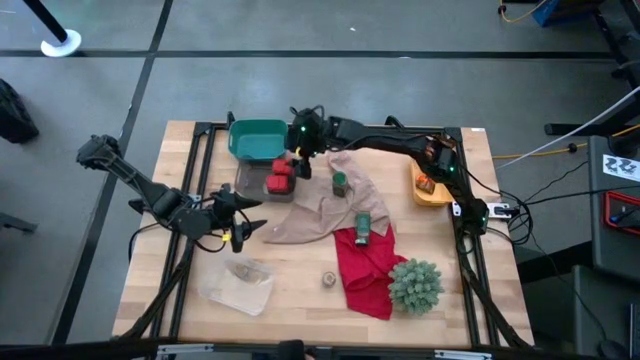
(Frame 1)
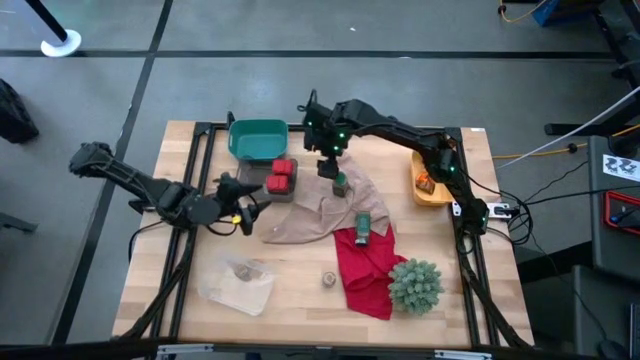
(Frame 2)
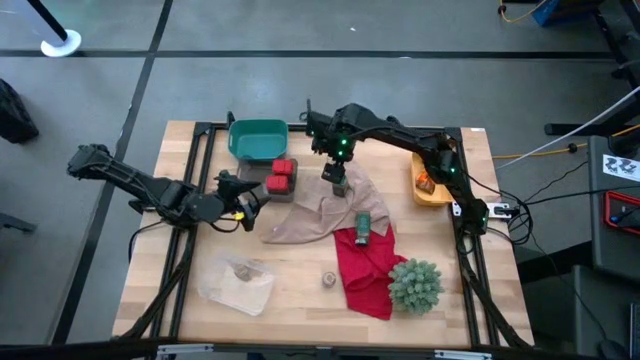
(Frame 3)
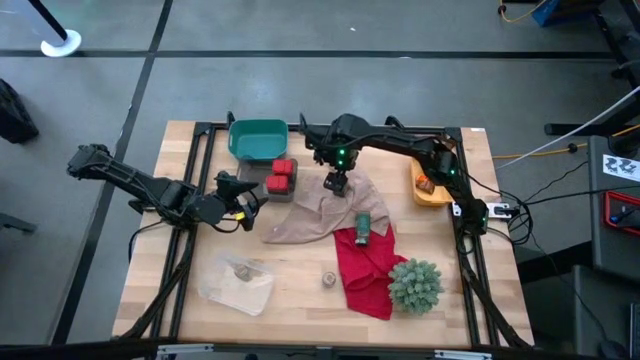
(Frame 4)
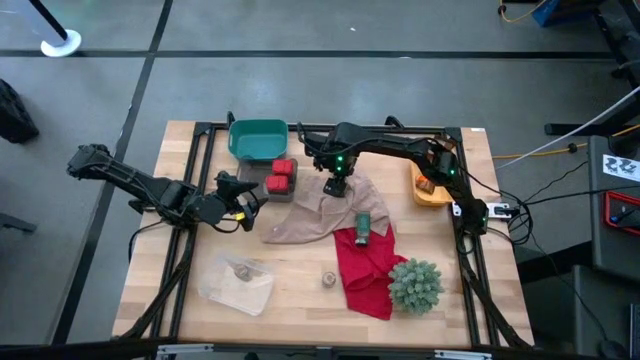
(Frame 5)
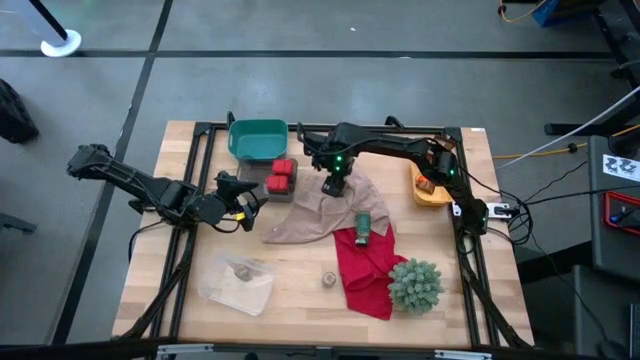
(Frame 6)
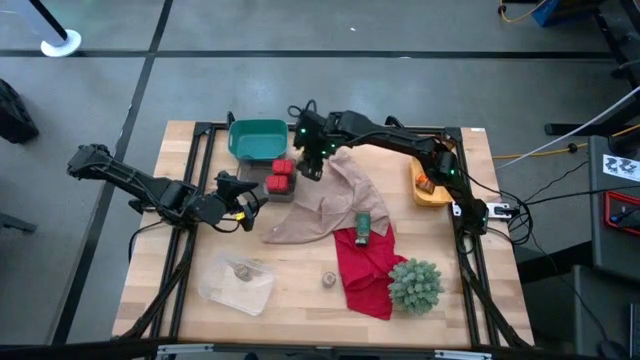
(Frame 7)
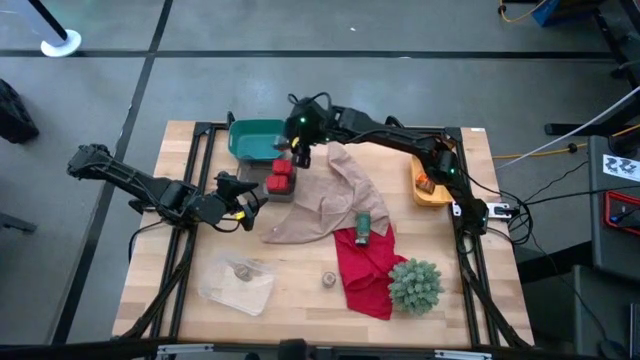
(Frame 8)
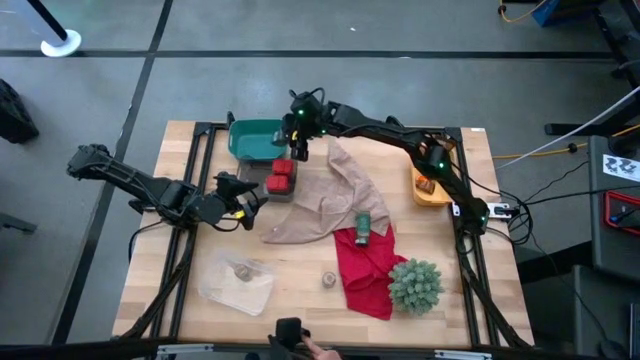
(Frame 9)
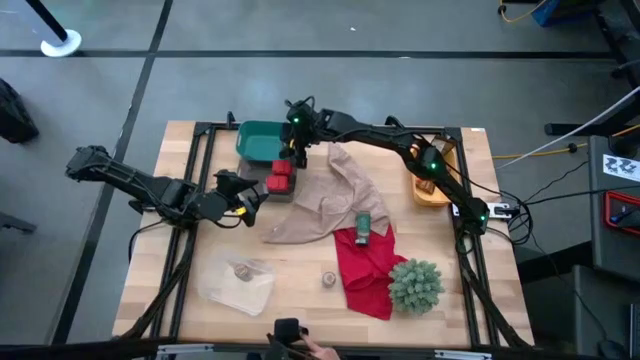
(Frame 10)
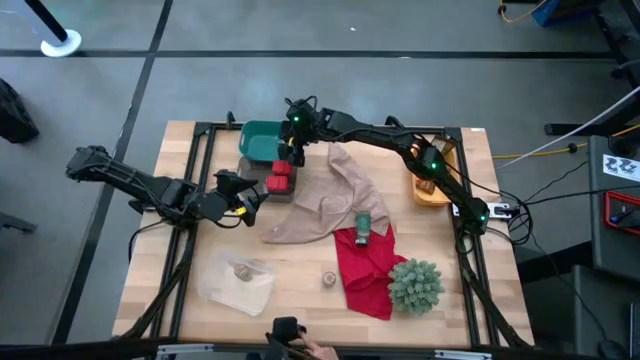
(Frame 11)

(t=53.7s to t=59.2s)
Task: Sort spices by type
Put the top green seasoning bottle into the green bin

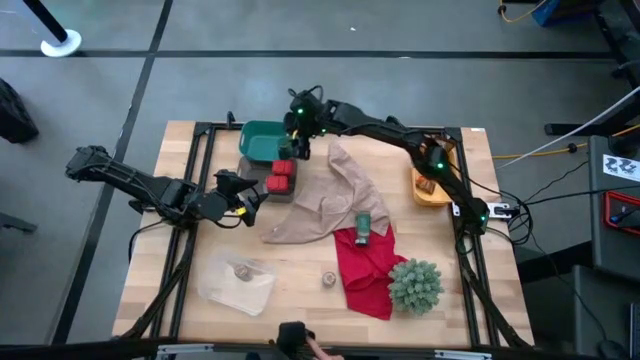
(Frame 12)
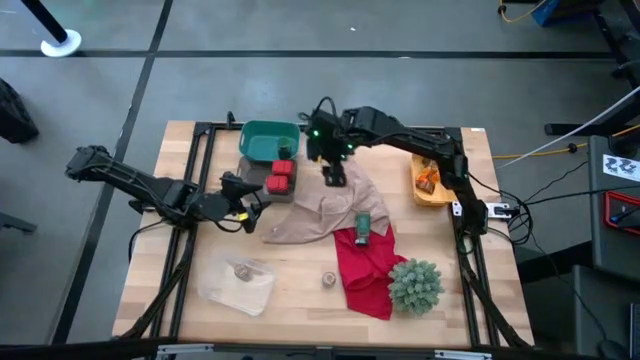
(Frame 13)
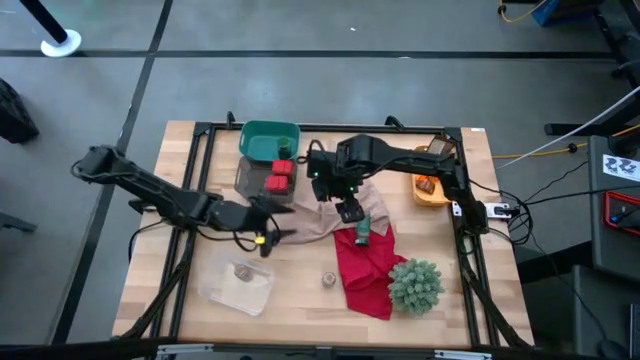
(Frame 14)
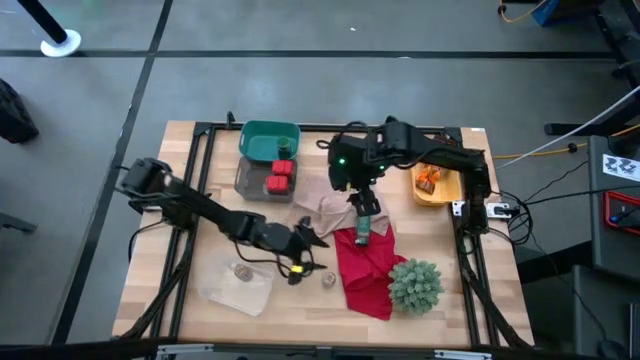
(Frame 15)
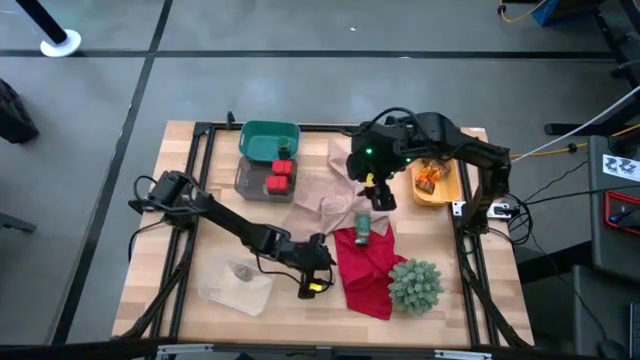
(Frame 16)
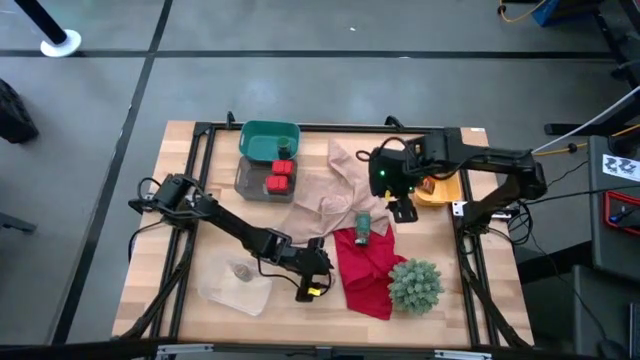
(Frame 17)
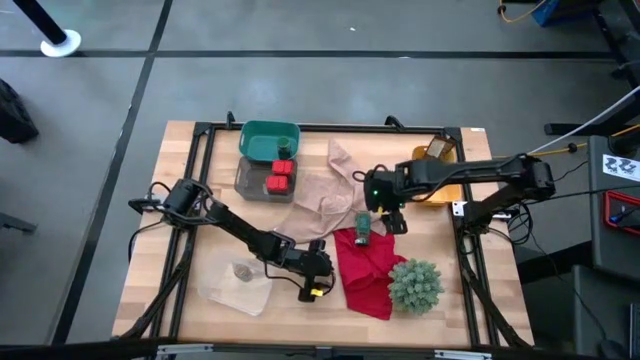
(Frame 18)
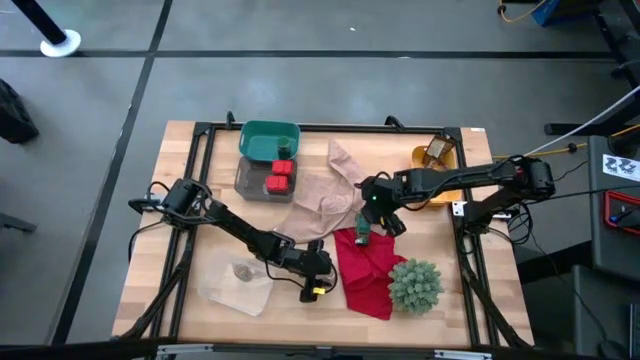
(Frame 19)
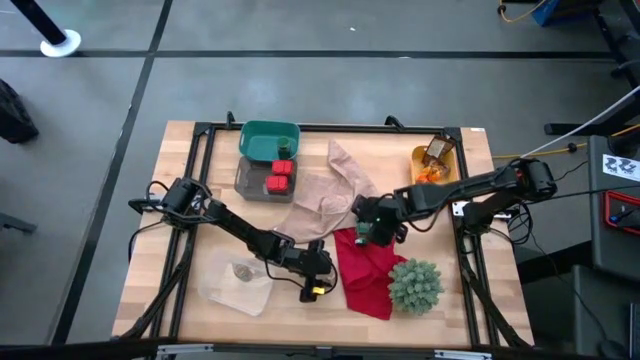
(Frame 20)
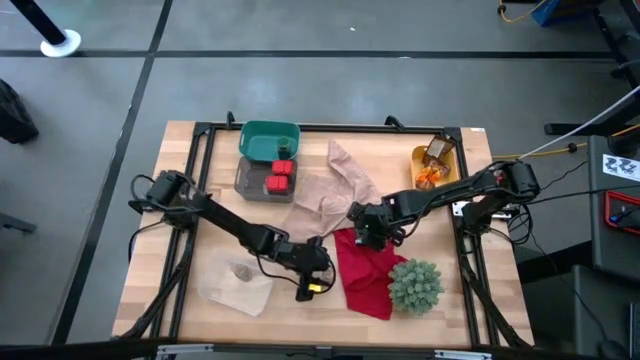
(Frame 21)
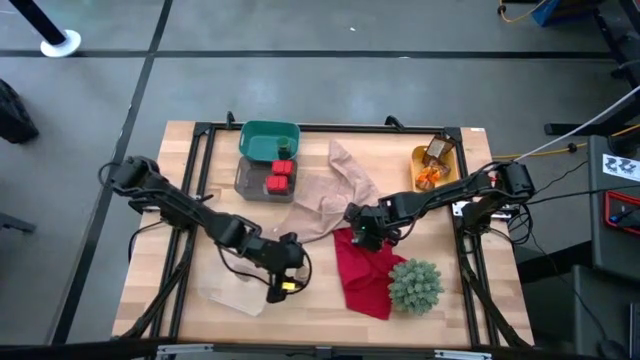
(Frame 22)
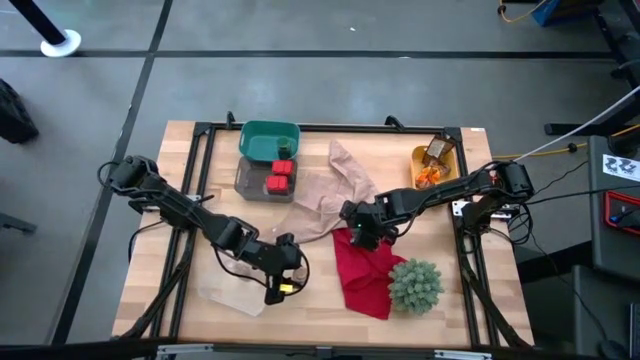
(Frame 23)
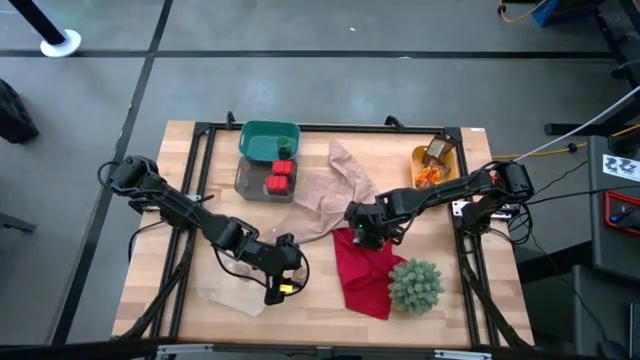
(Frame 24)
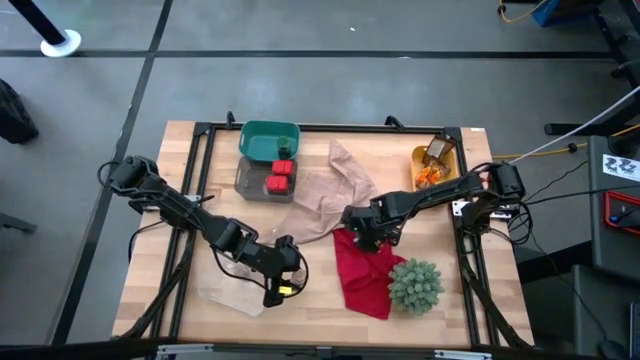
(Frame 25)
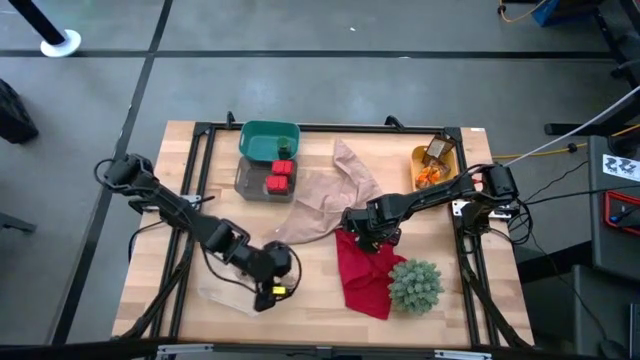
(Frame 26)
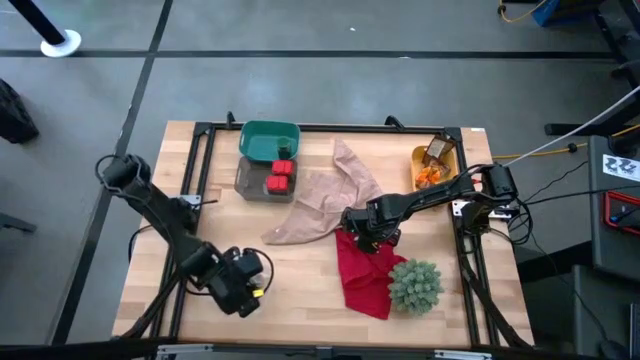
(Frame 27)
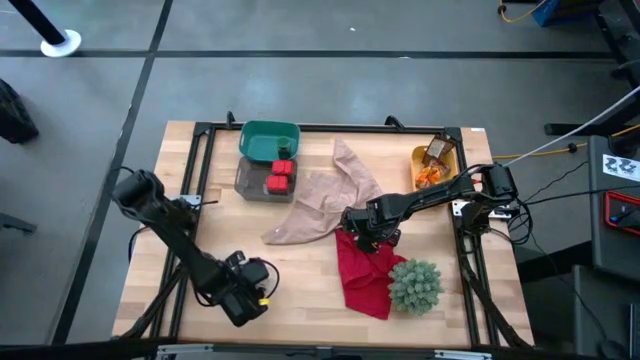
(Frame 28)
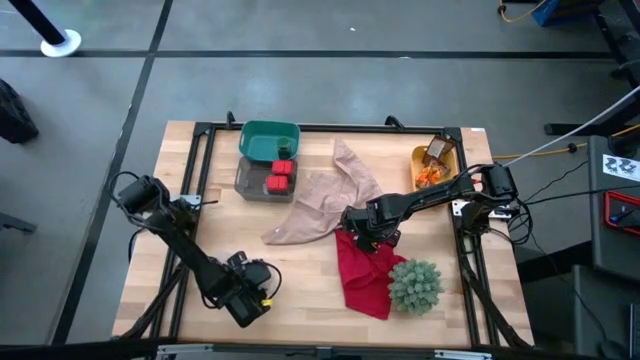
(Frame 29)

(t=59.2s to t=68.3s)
Put the brown seasoning bottle into the transparent bin
